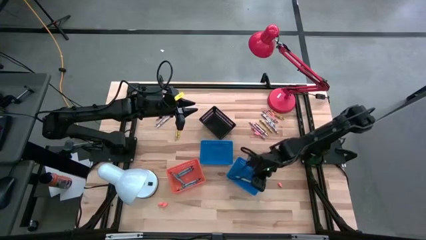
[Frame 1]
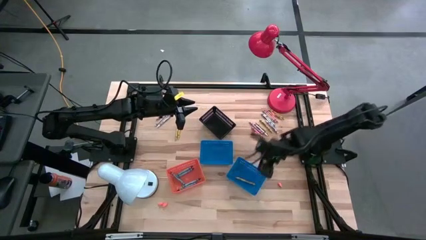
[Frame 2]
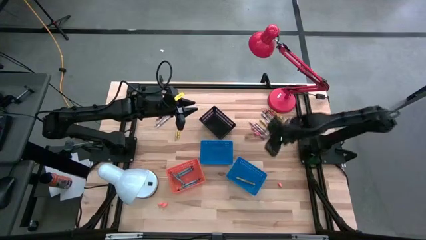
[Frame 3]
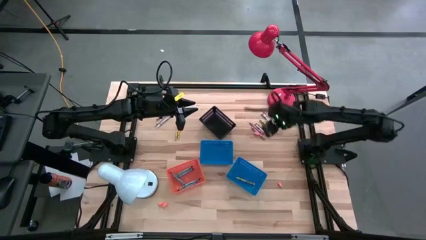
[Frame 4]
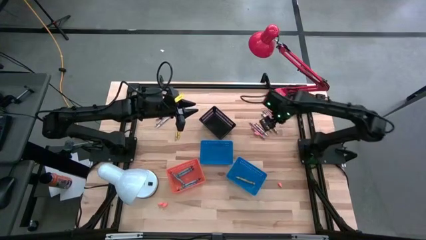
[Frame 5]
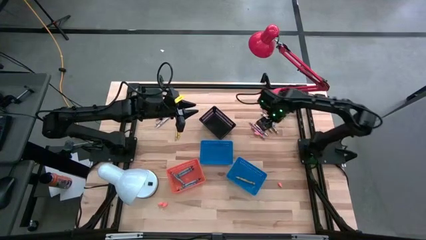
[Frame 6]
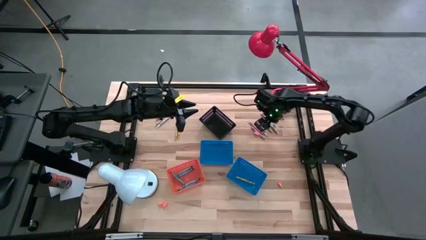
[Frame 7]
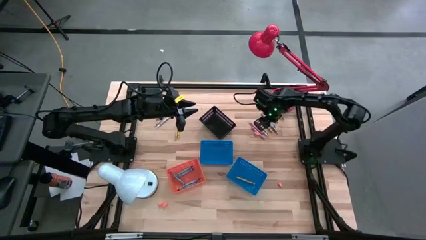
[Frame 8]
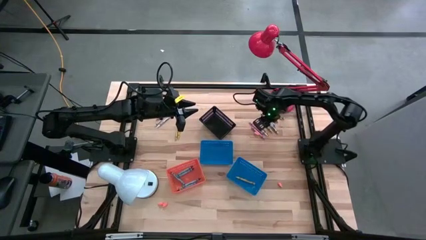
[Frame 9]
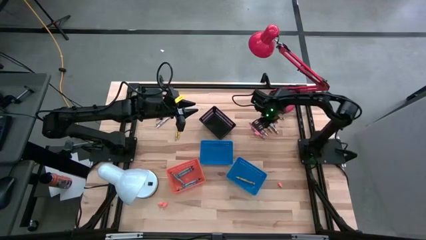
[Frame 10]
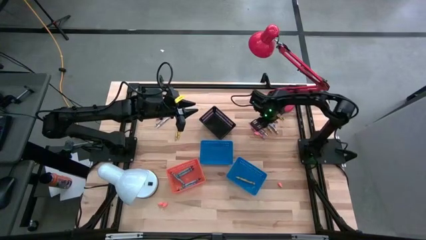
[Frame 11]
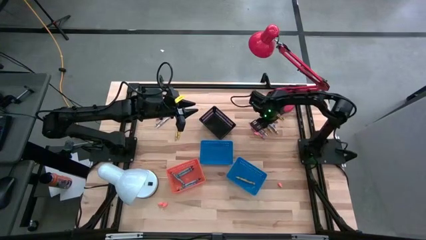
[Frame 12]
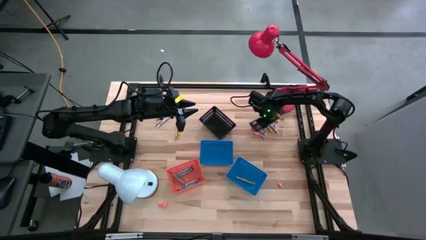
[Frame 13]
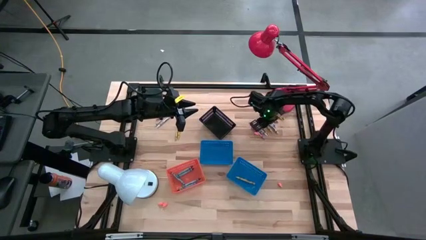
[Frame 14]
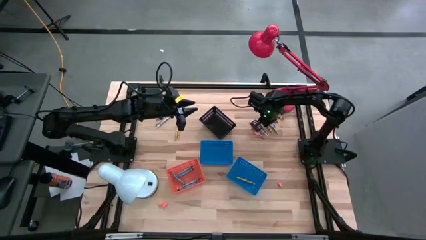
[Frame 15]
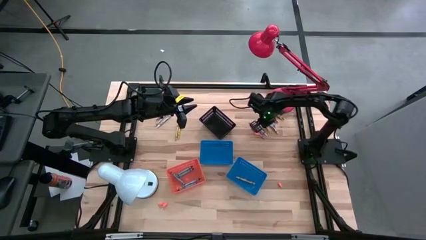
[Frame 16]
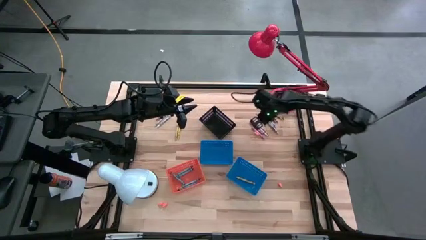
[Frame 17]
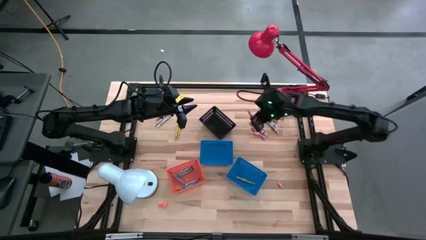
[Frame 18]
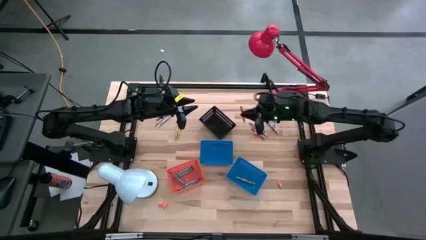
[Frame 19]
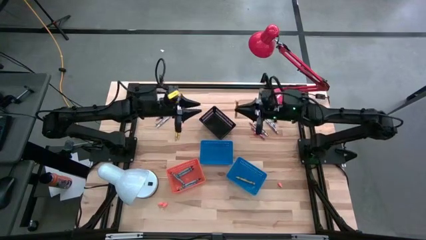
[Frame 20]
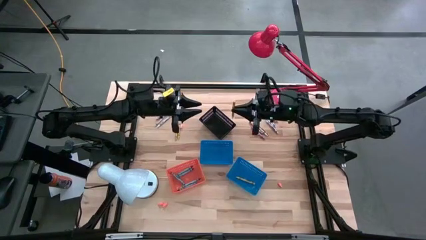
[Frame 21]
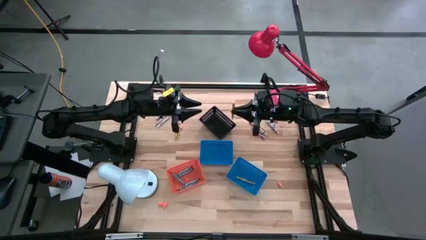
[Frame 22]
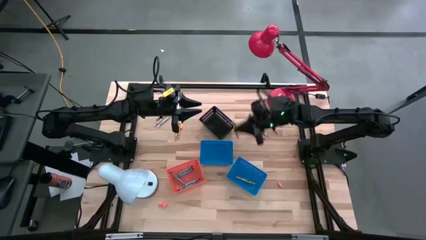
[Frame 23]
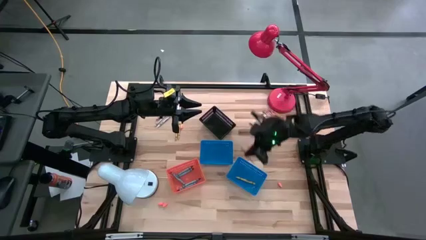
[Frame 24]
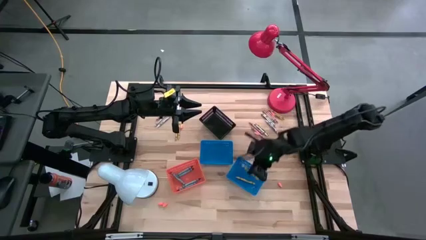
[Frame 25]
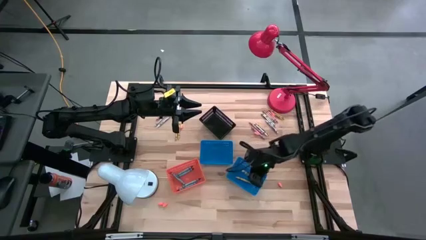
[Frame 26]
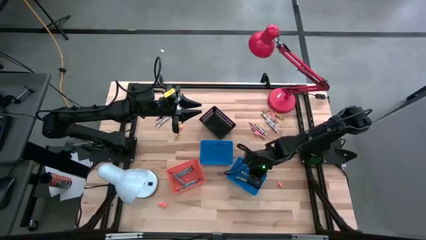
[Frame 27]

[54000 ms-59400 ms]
Task: Sort crayons
Put the yellow crayon into the right blue bin

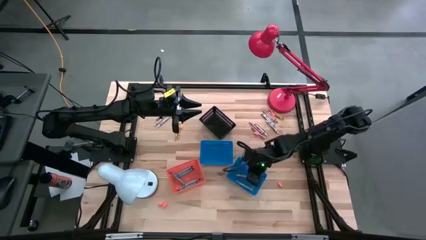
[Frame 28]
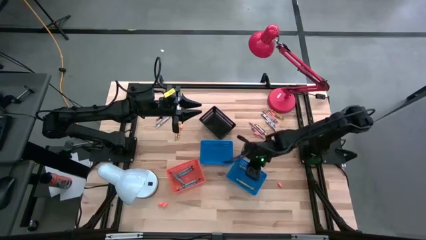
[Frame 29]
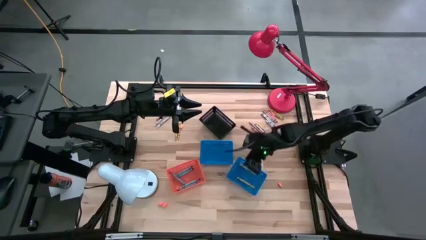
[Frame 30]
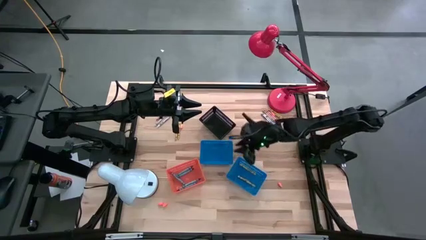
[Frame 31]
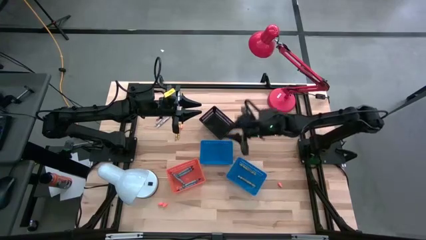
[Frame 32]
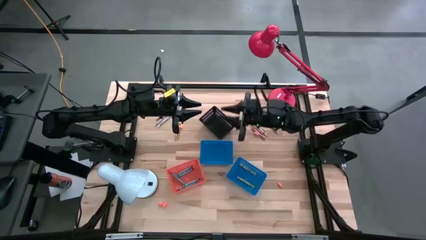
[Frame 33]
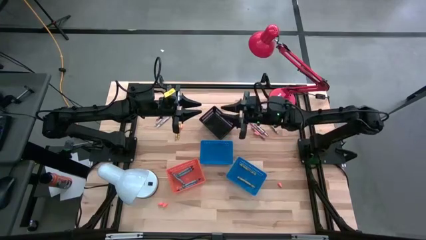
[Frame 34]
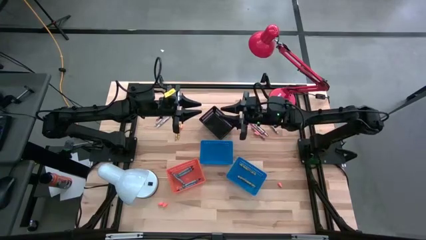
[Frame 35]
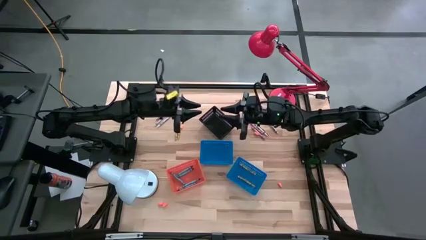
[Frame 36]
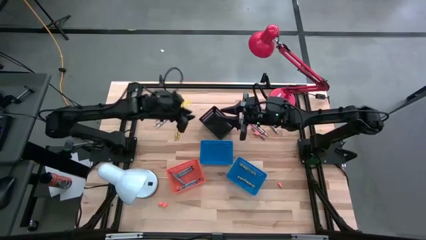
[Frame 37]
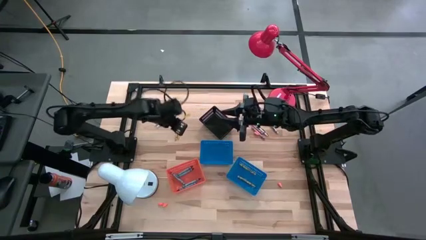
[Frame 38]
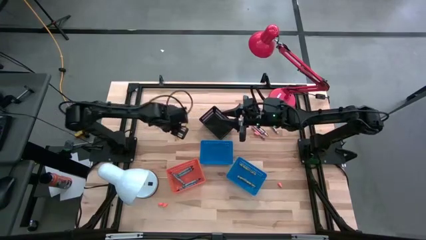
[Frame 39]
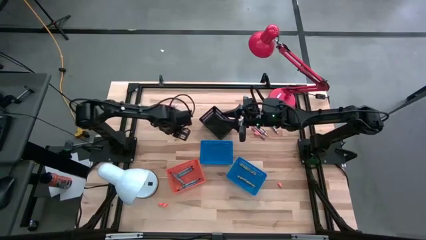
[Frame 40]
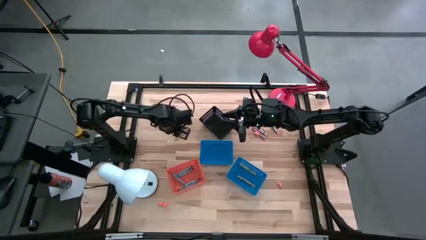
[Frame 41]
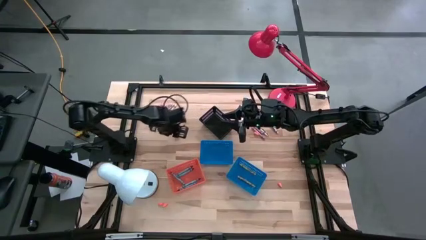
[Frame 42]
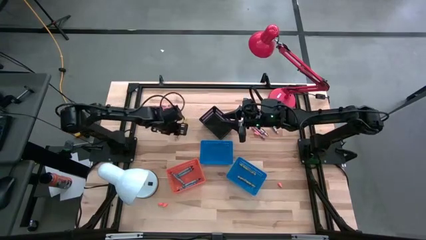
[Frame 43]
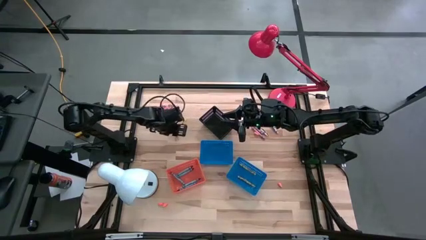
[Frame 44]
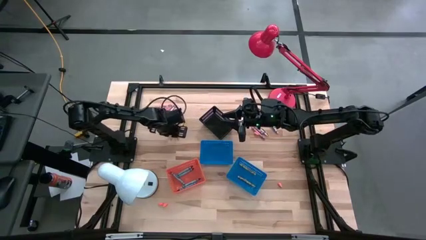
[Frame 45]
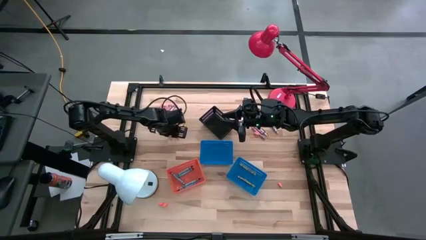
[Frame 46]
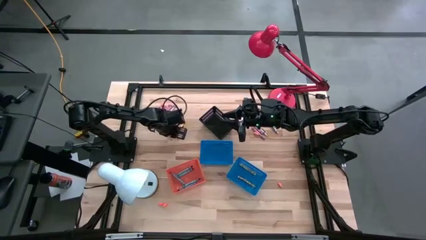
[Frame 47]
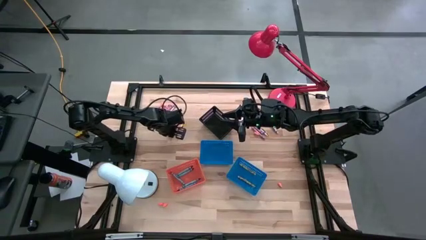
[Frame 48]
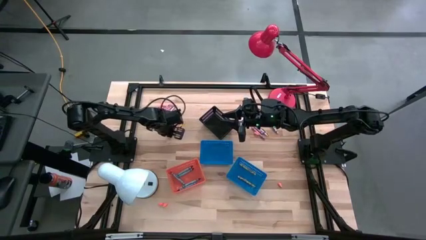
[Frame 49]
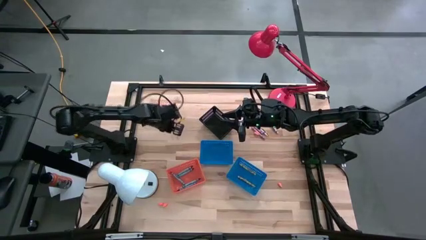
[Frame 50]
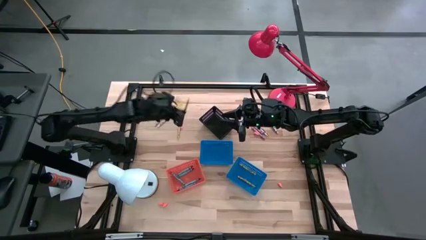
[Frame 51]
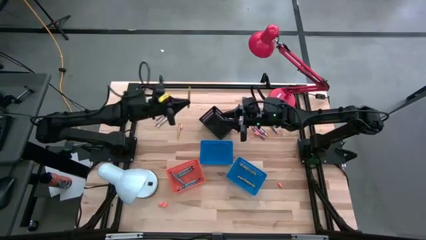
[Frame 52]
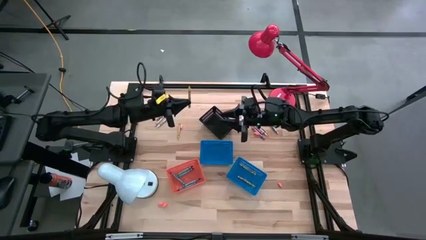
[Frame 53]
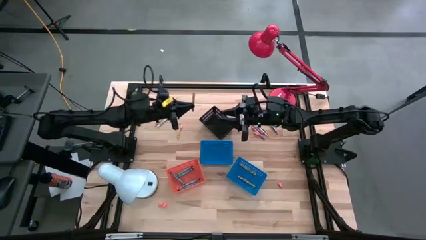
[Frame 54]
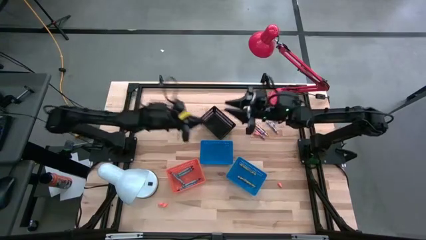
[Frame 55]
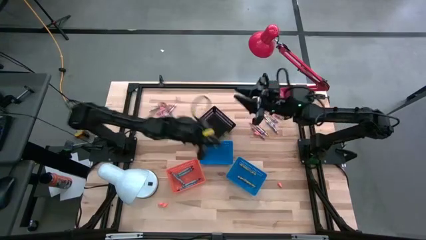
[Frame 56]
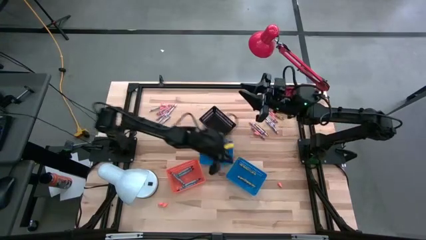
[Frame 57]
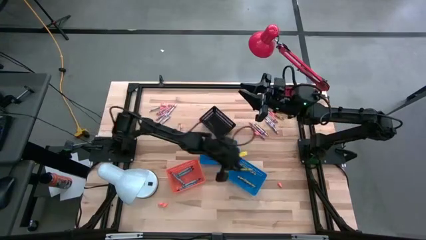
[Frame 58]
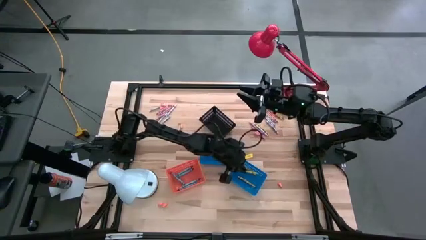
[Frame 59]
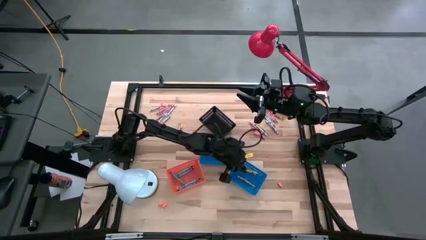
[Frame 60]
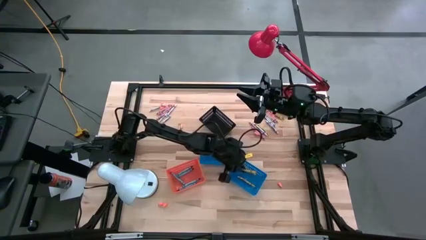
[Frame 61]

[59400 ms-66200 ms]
Put the yellow crayon into the right blue bin

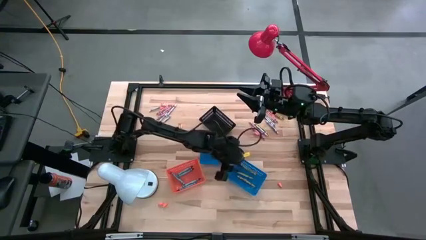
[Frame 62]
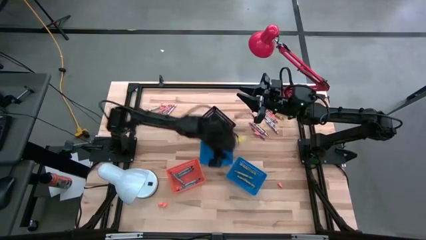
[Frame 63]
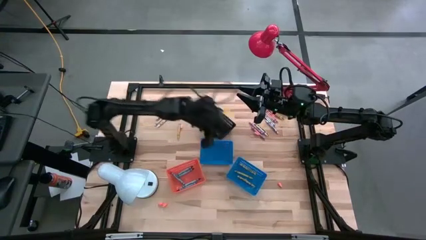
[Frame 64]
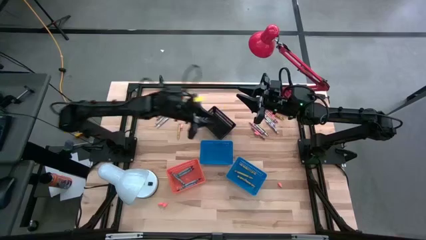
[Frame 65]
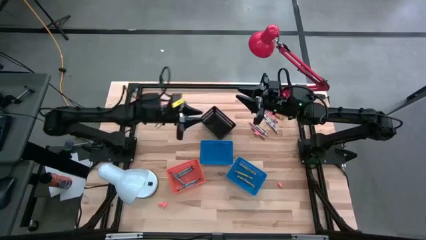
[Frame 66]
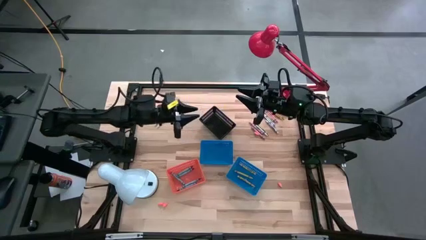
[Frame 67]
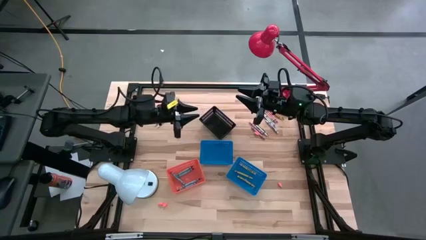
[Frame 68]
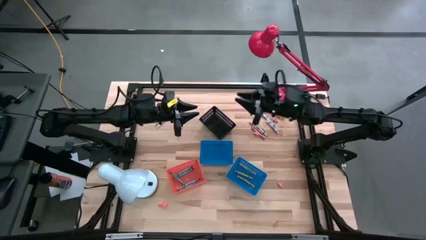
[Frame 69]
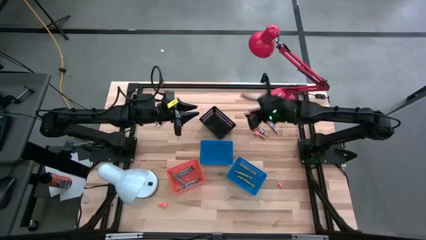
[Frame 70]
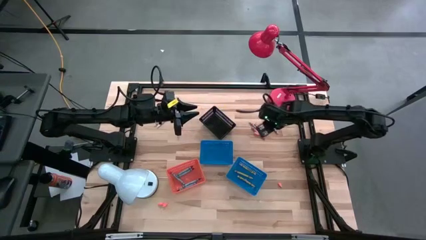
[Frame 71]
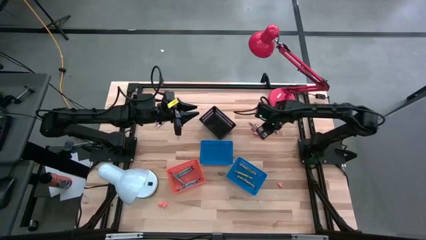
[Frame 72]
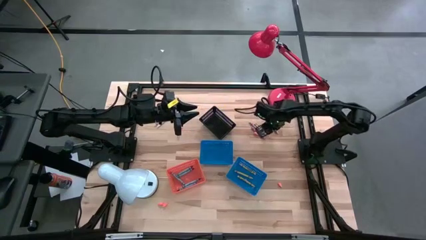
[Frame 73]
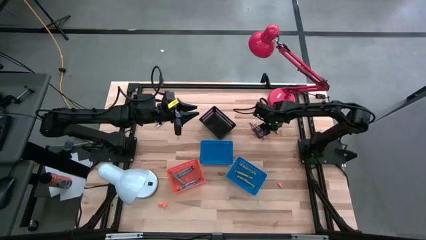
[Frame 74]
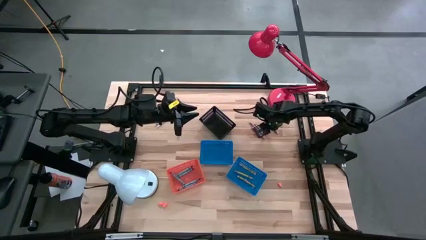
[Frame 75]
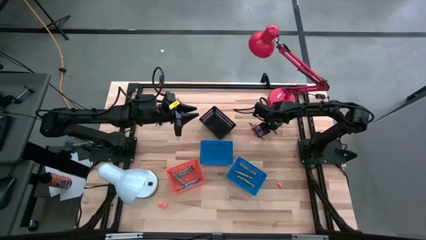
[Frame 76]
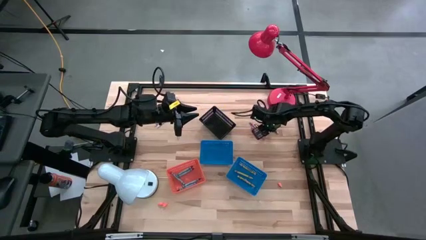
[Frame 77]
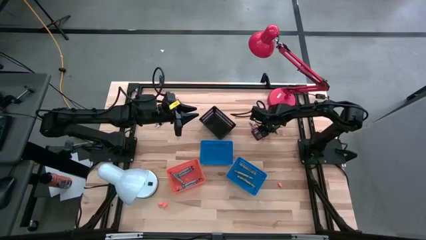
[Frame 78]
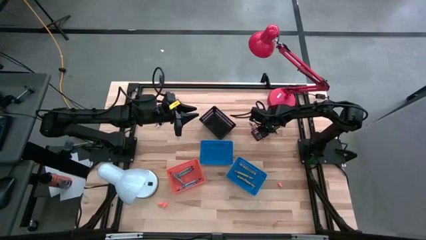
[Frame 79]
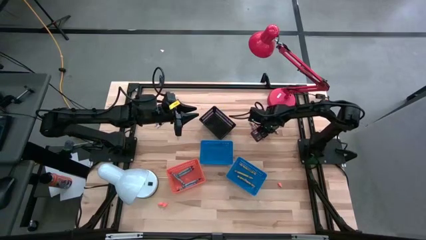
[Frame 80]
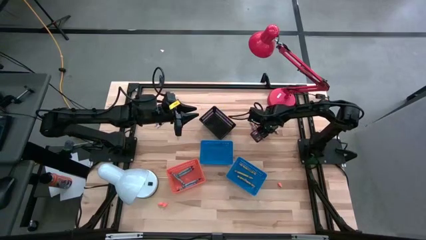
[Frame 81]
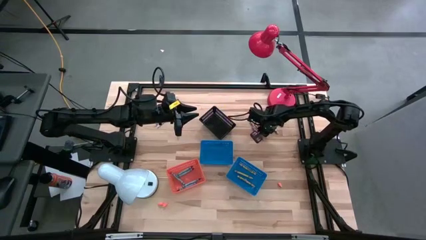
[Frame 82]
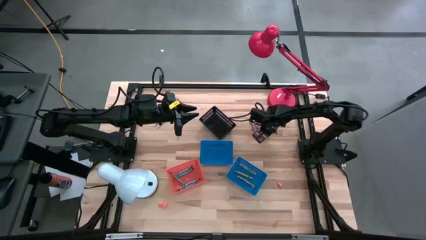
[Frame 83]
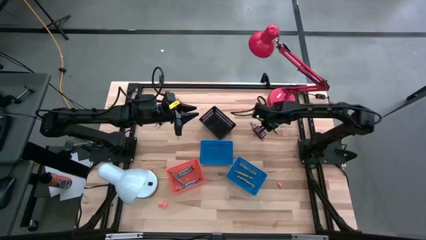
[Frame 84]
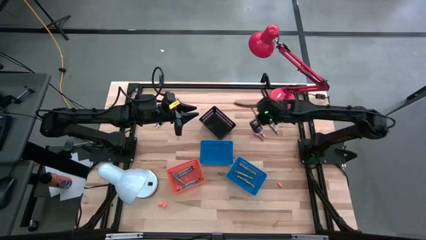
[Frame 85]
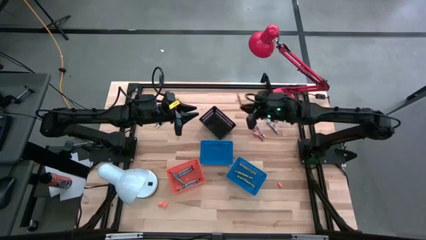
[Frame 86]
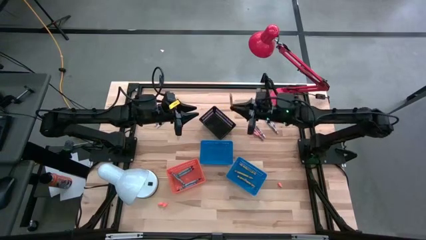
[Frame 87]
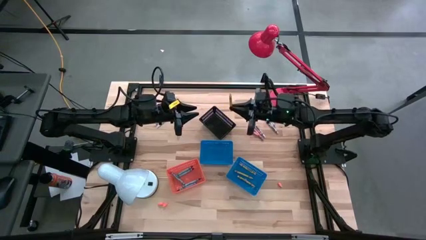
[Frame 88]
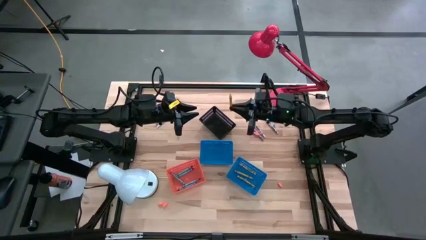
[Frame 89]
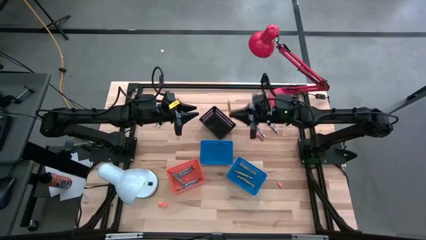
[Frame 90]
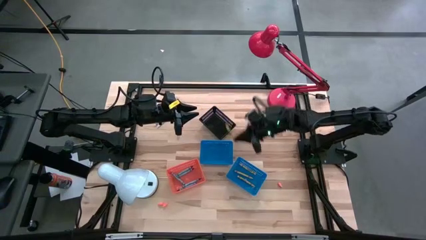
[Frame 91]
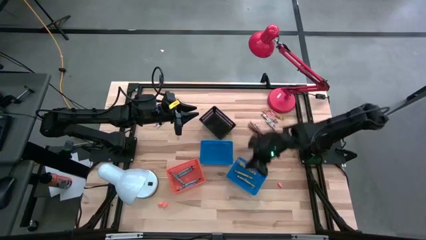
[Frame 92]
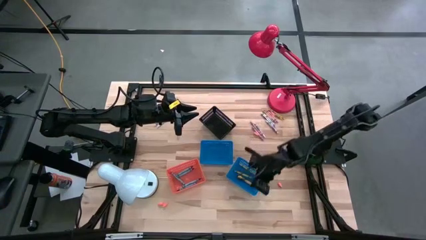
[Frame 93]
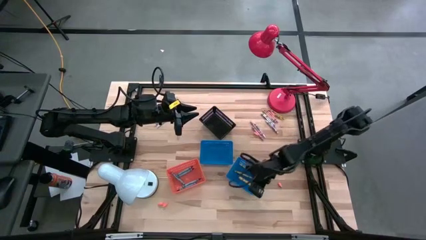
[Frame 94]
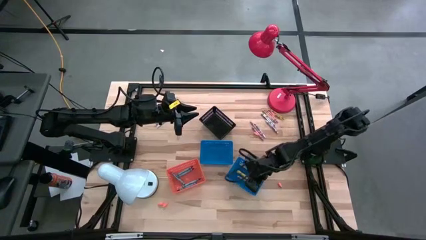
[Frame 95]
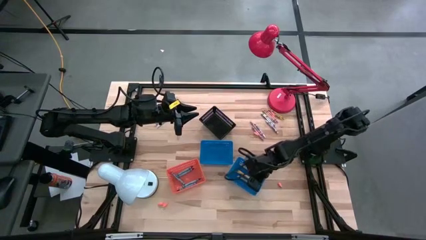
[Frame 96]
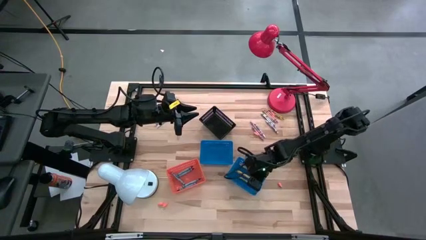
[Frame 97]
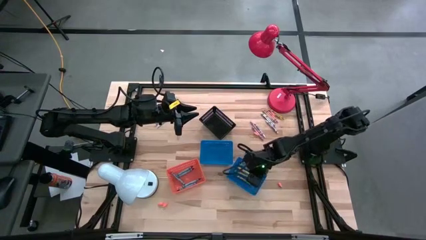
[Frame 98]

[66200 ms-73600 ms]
Put the yellow crayon into the right blue bin
